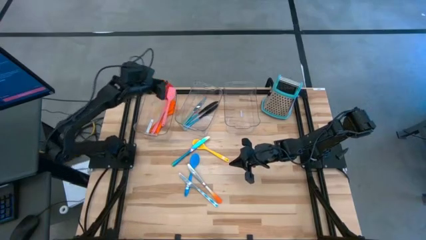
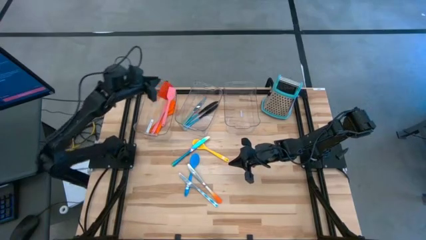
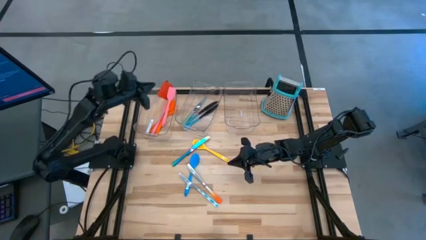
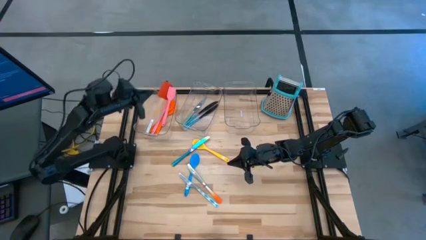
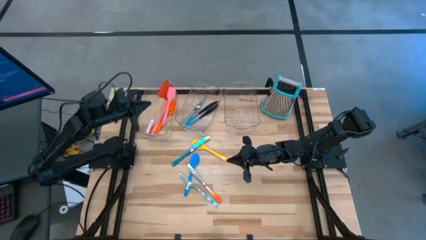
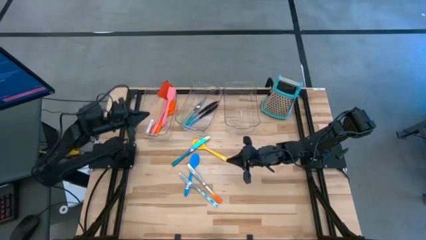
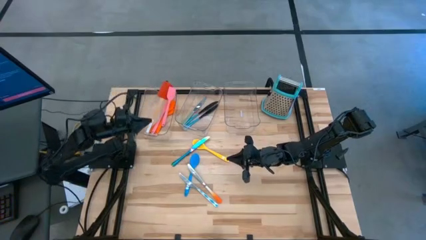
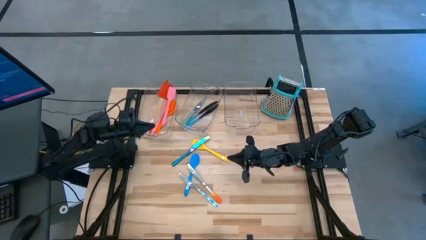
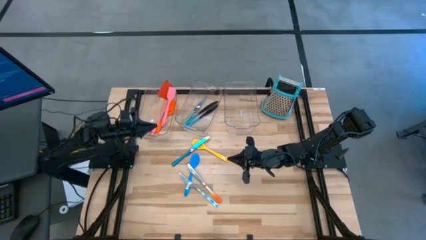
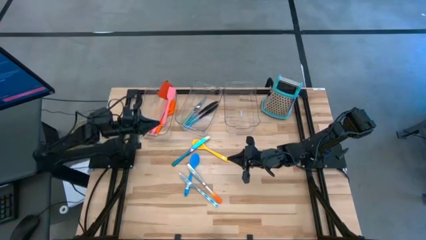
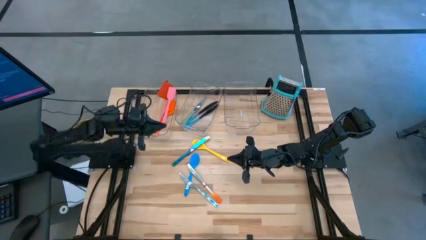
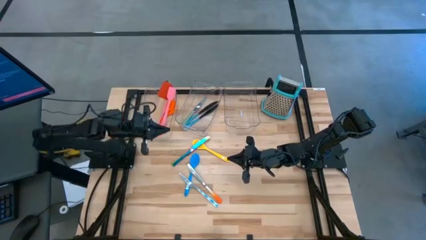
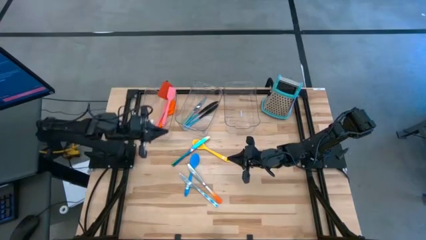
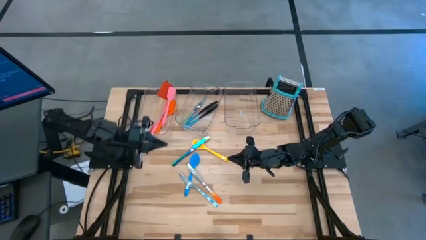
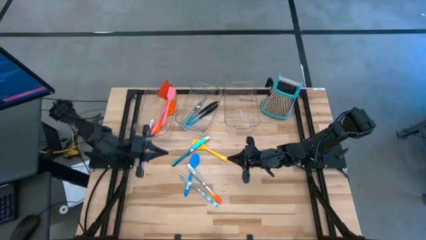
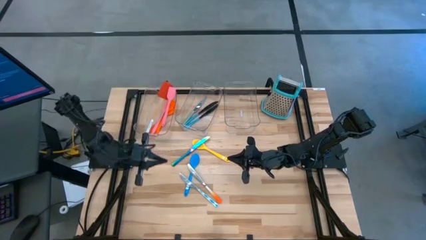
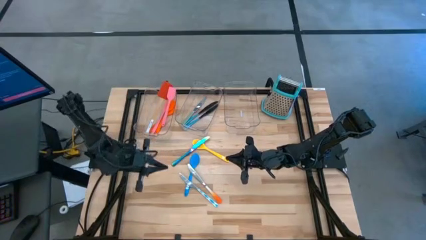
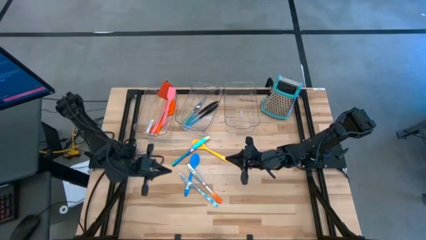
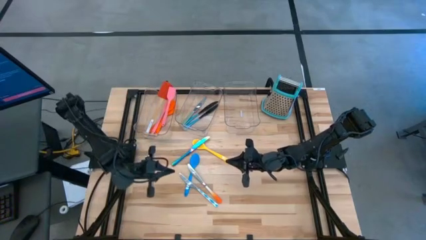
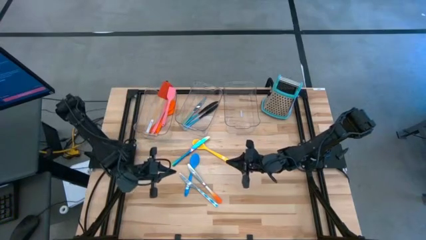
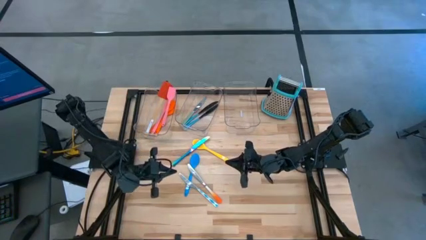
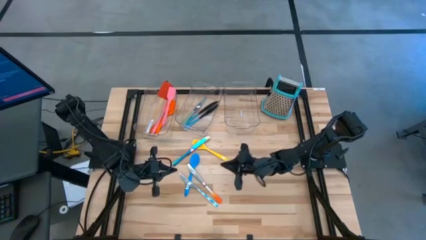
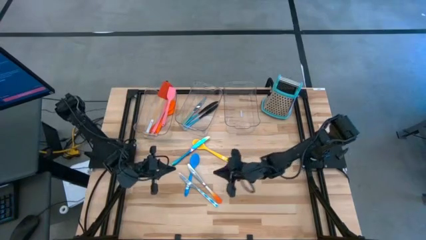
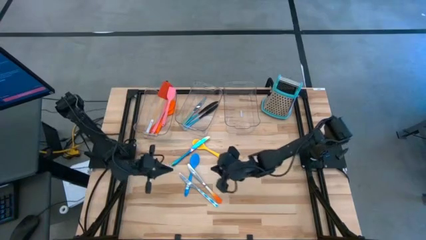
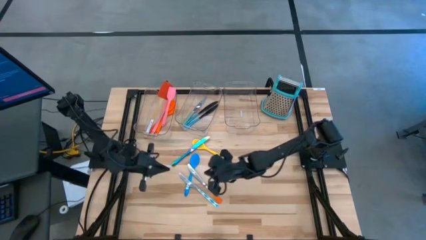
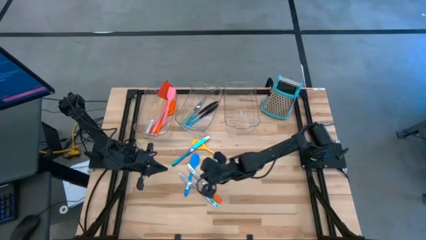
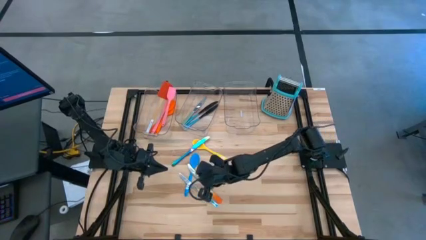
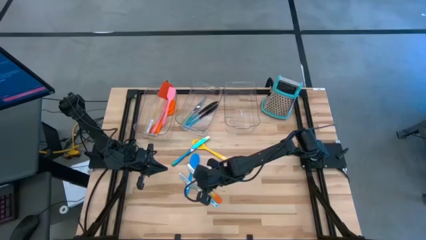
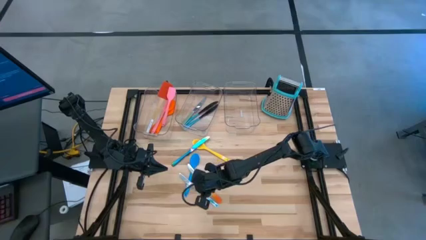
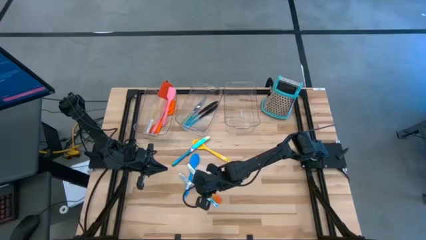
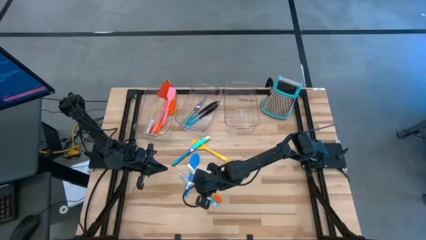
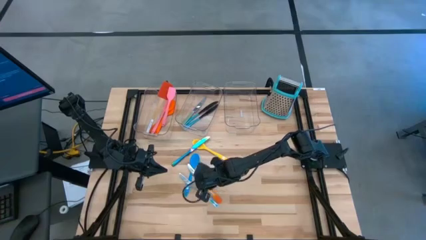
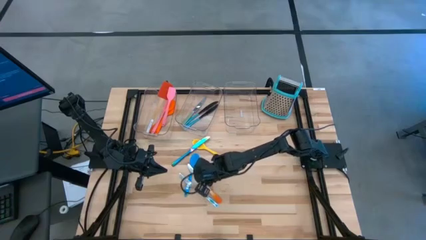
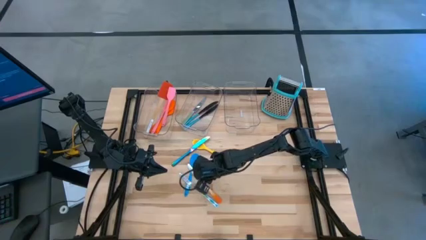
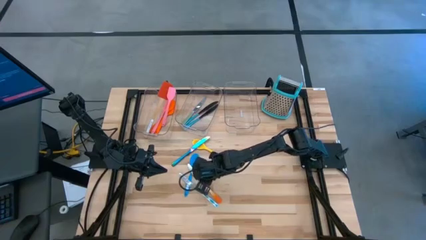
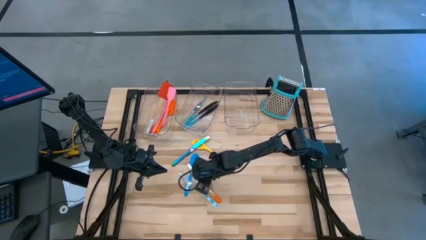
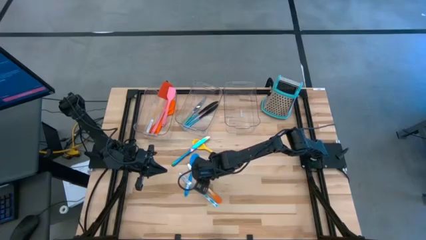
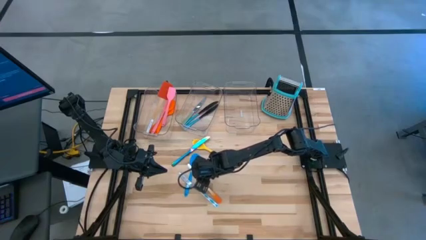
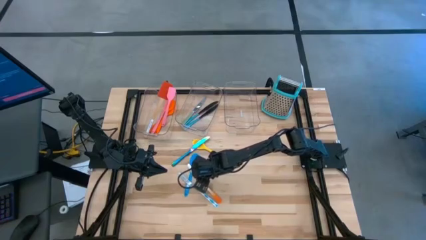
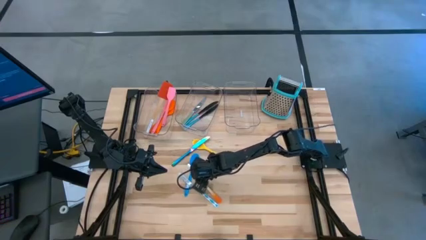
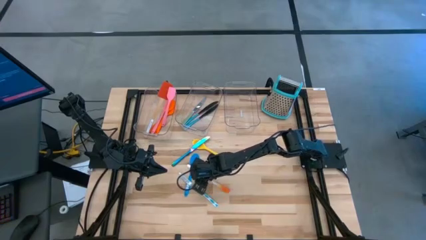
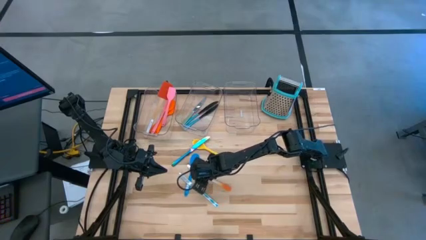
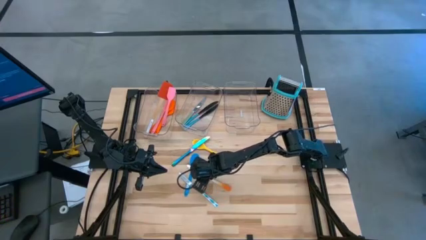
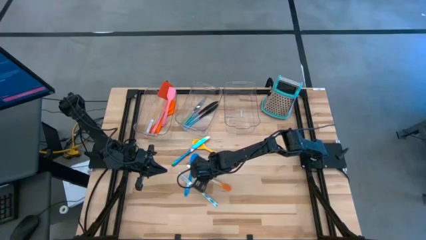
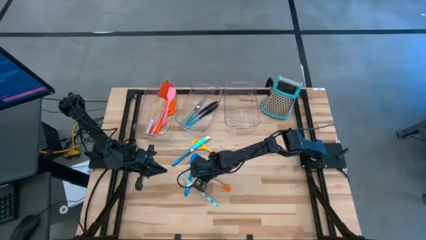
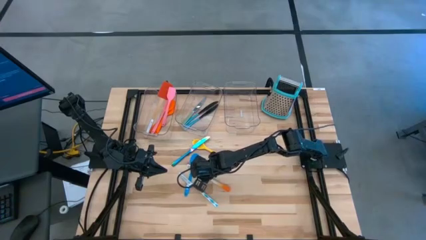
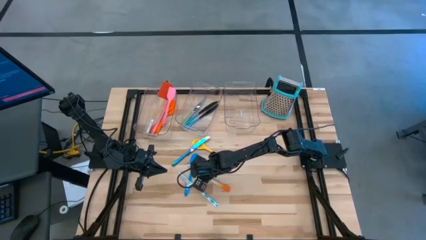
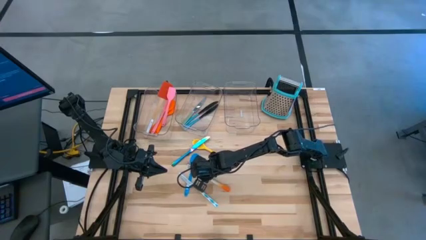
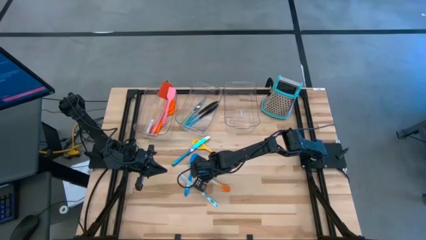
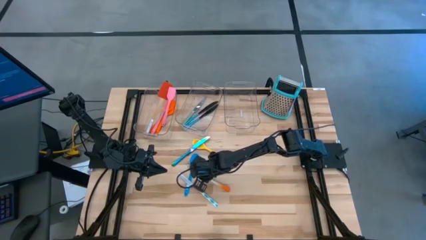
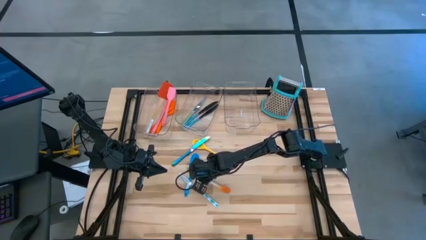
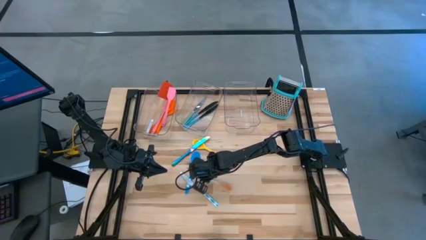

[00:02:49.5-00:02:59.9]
Task: Pick & Place Kitchen Items
Put the orange knife into the middle transparent bin

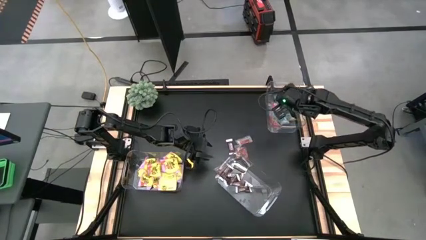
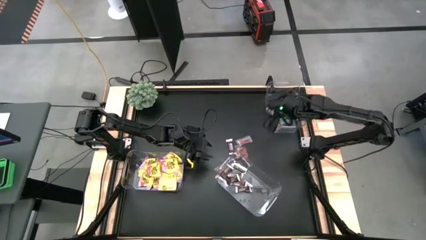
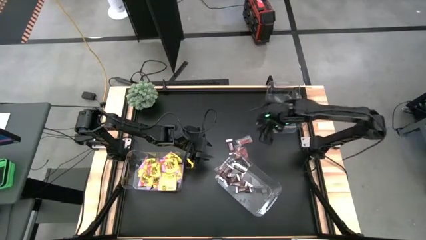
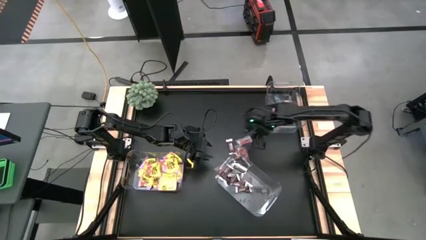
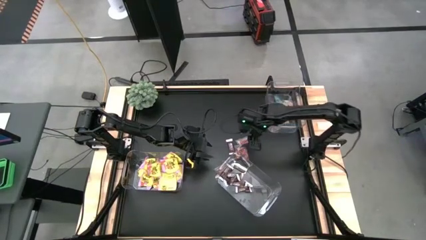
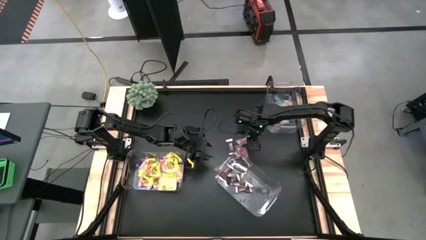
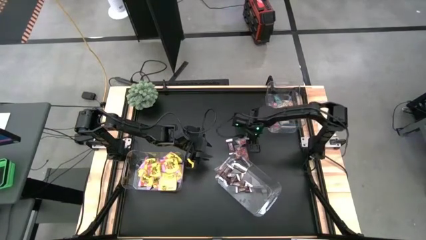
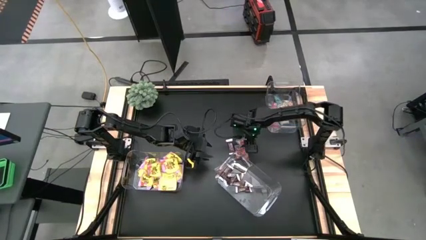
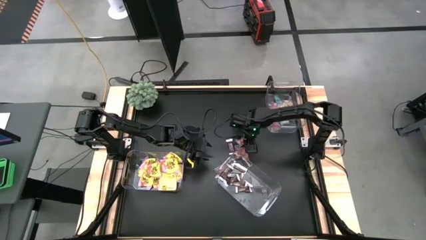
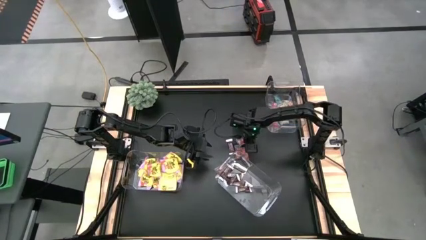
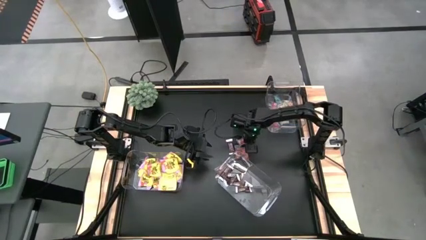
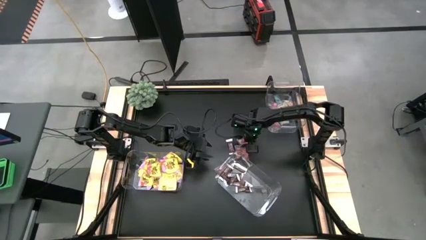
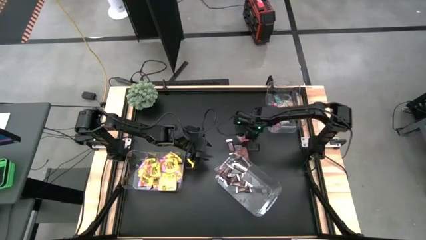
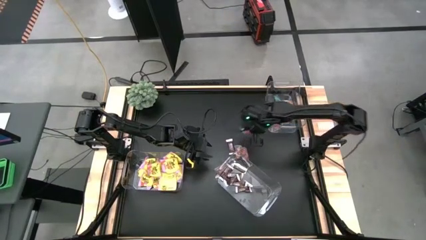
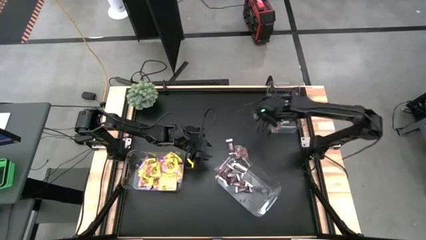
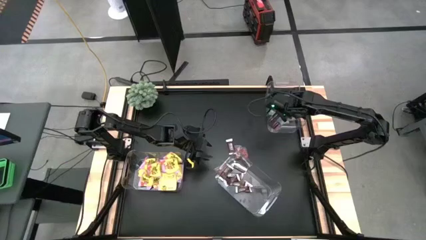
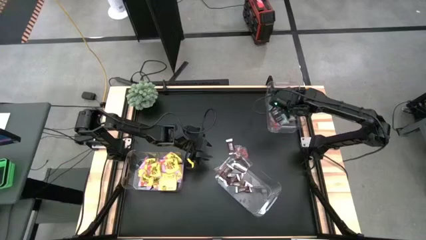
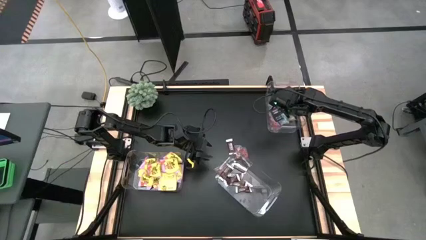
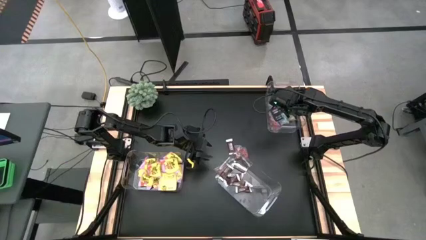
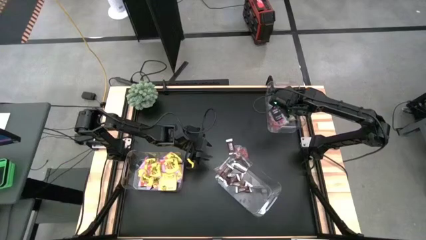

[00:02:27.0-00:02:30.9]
Task: Sort candy
Put the red candy in the top right transparent container

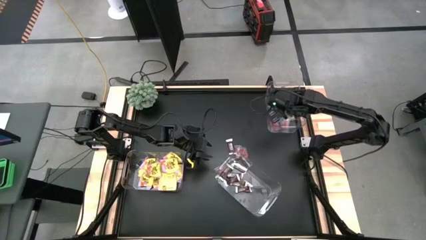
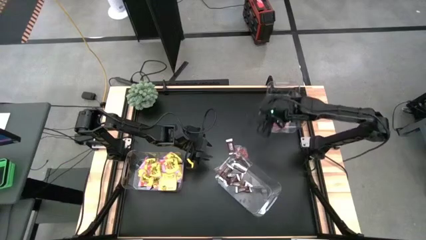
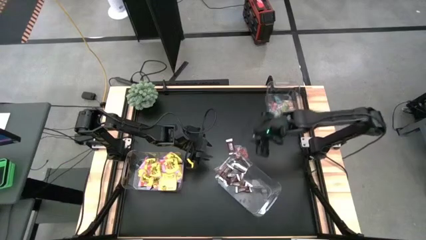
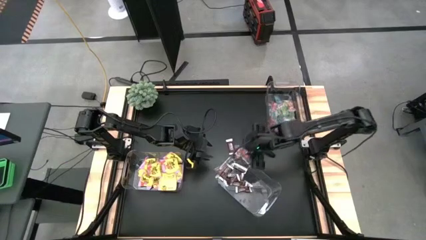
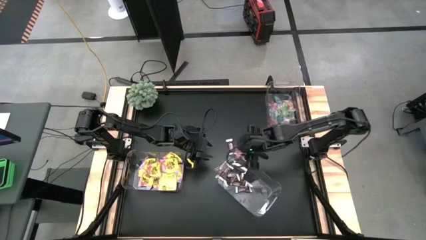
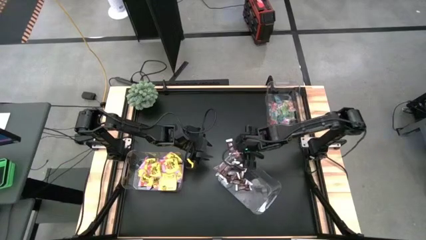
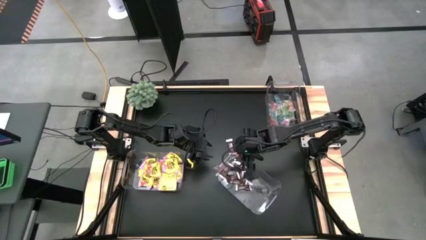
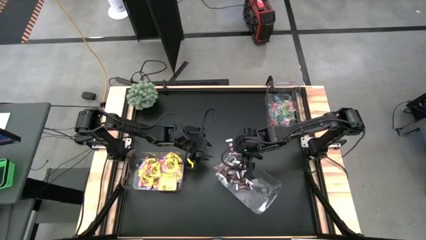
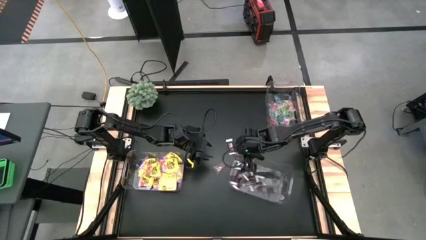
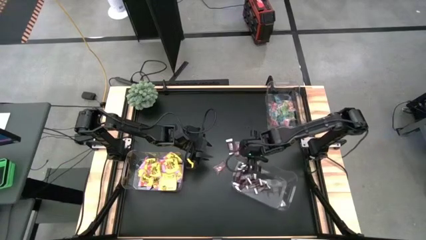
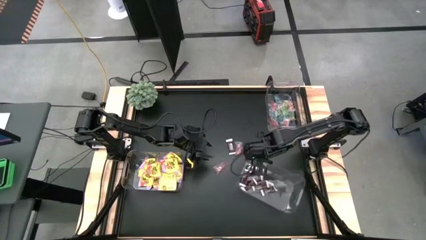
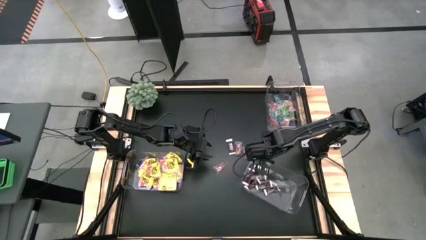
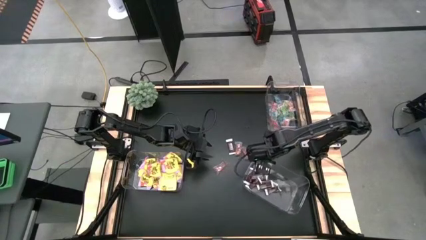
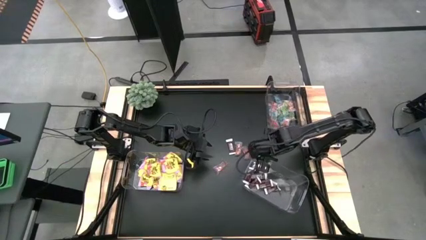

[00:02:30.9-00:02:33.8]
Adjust the bottom right transparent container
